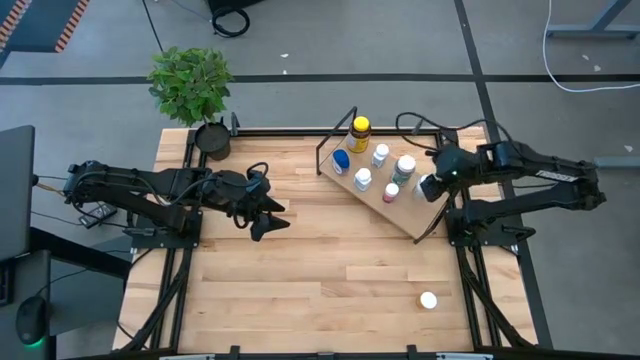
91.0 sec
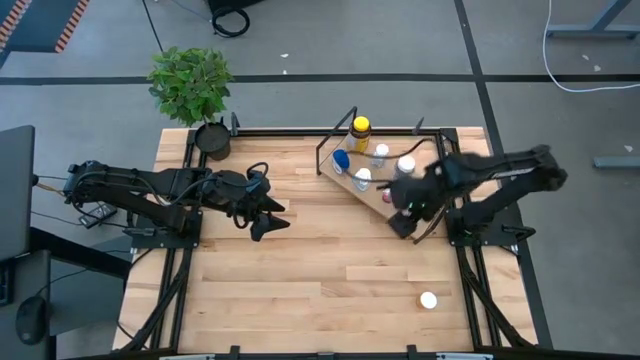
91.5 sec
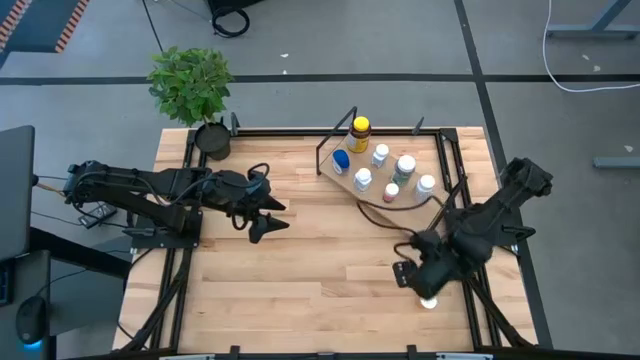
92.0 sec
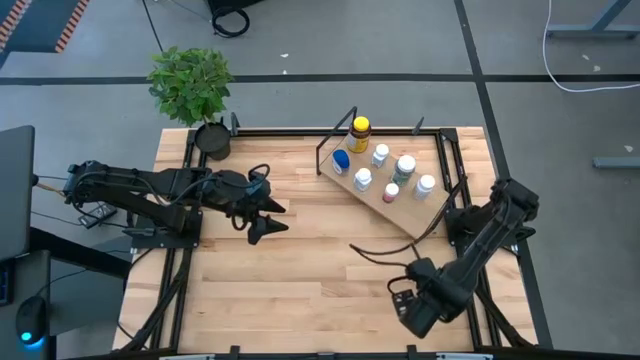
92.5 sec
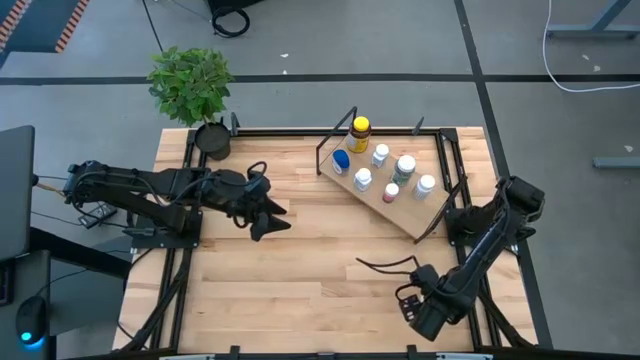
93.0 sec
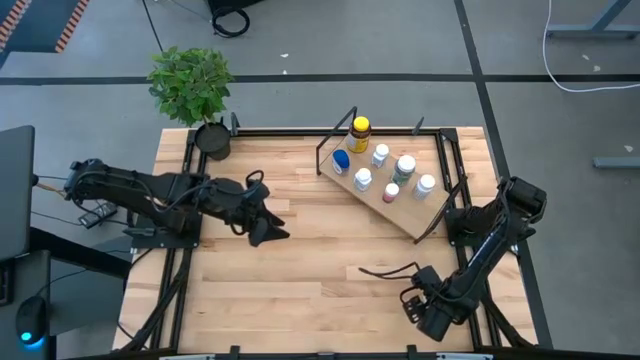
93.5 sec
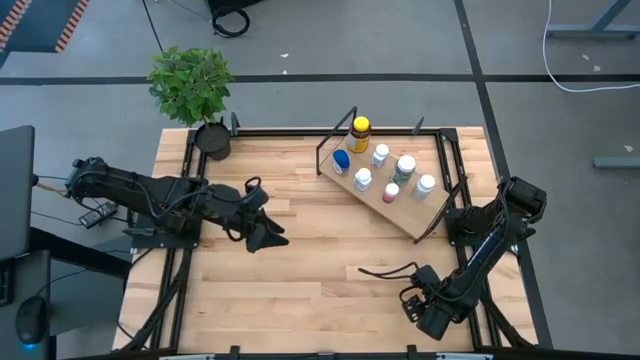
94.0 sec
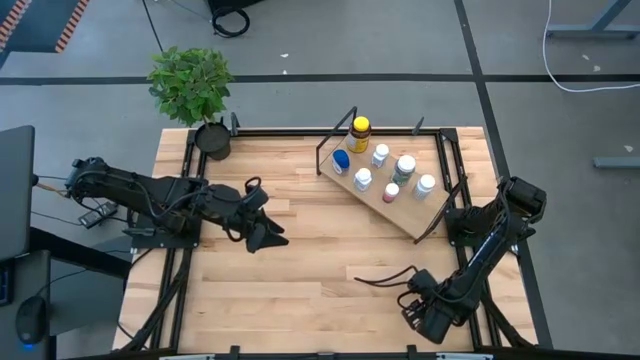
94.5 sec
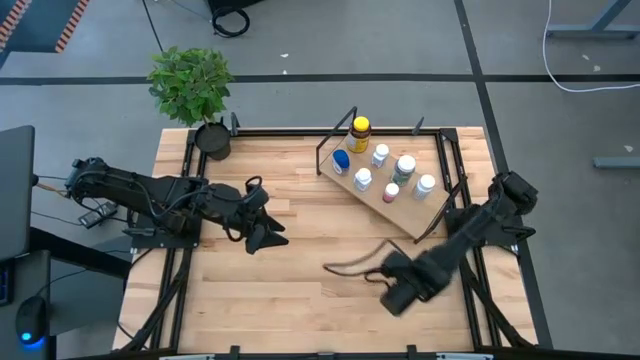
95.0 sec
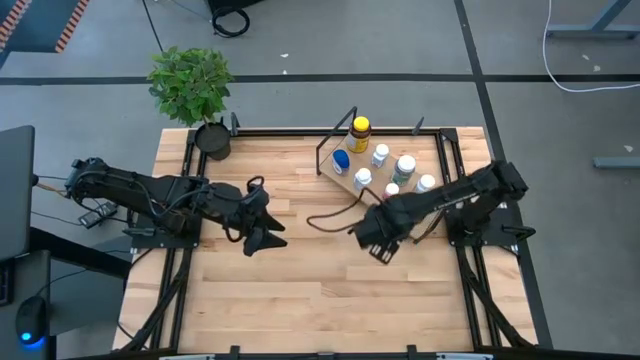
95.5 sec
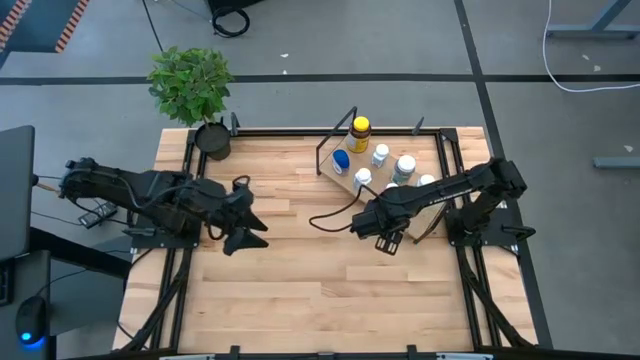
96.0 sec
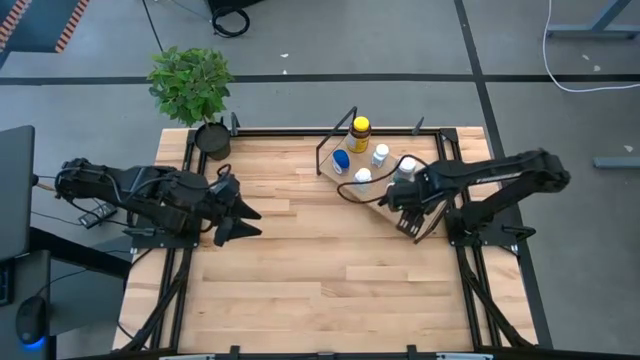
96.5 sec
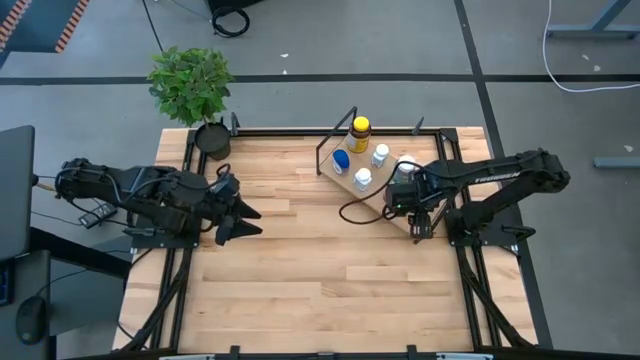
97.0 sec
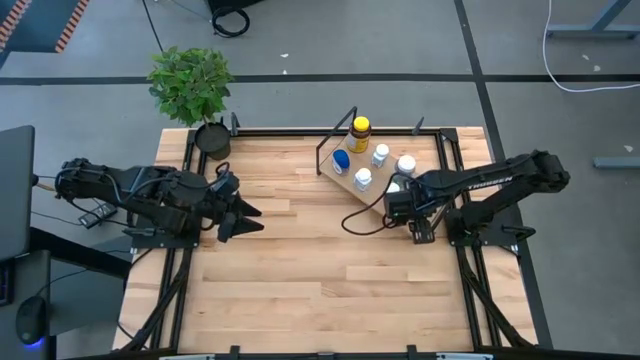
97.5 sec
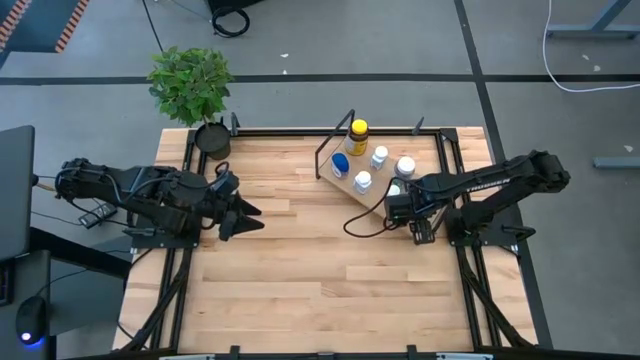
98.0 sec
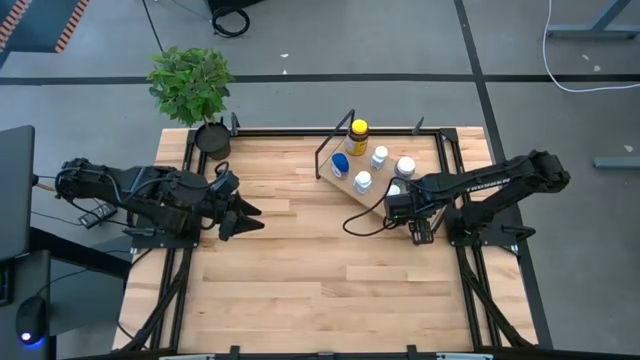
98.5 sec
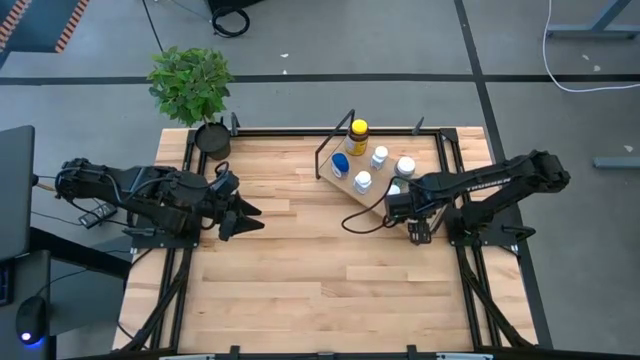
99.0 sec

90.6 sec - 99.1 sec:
Task: Pick and place medicine bottles onto shelf by color
Put the orange medicine bottle on the shelf

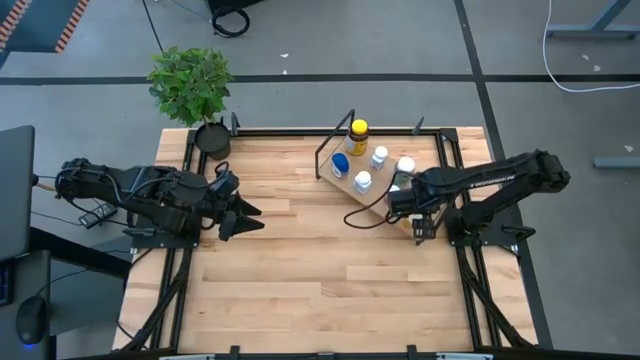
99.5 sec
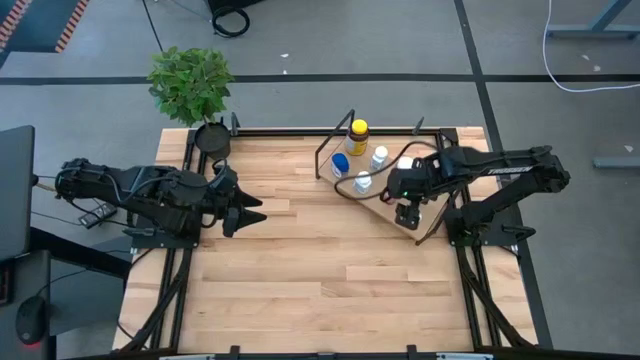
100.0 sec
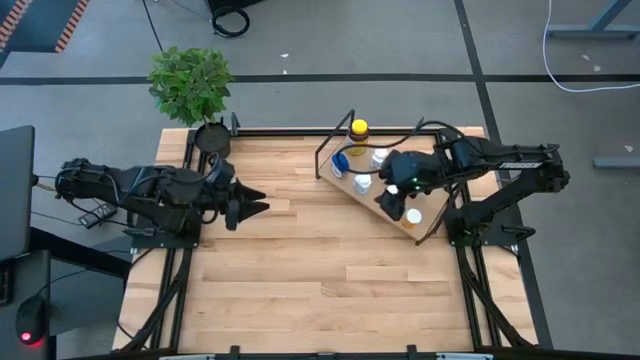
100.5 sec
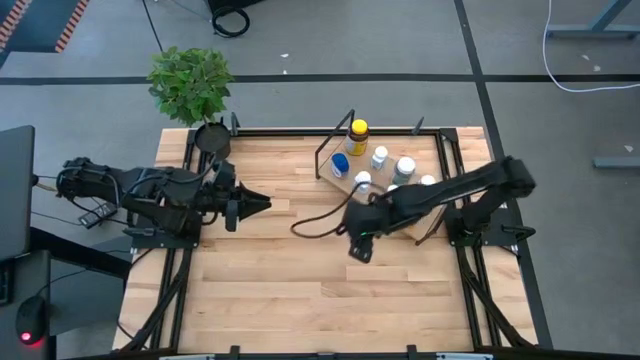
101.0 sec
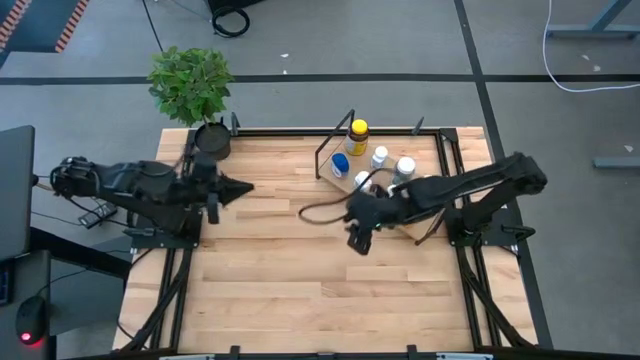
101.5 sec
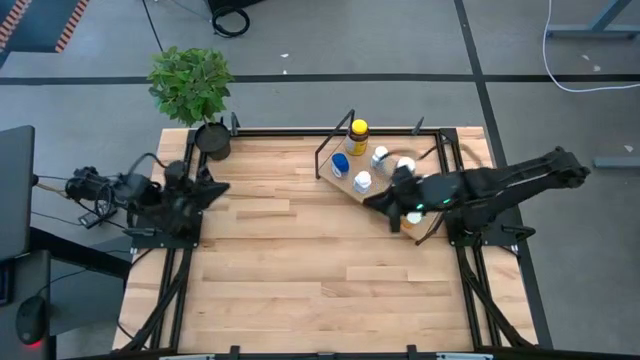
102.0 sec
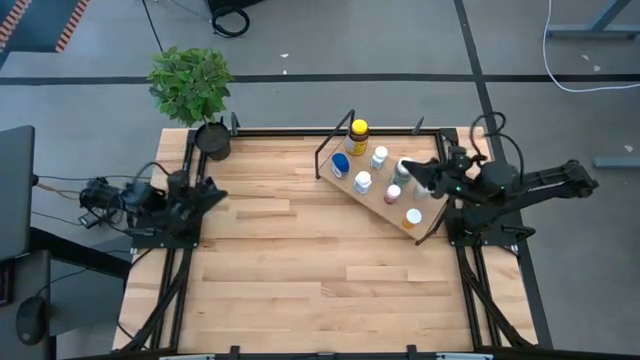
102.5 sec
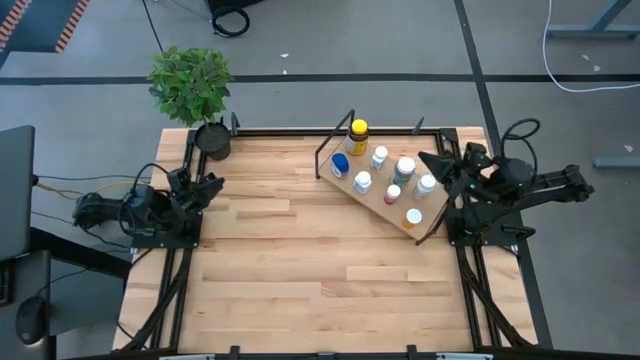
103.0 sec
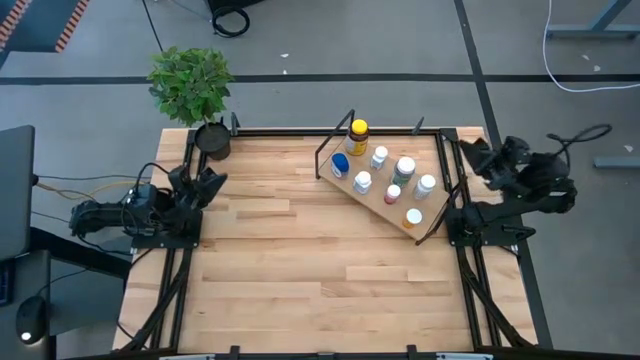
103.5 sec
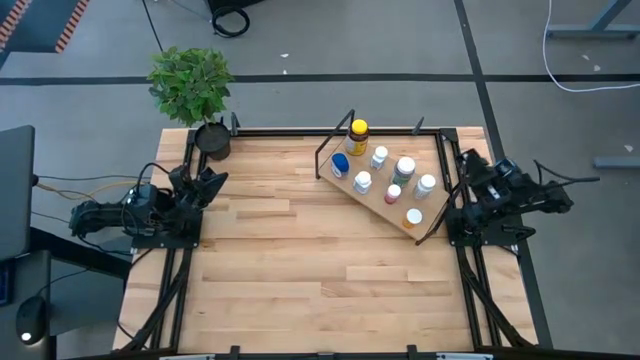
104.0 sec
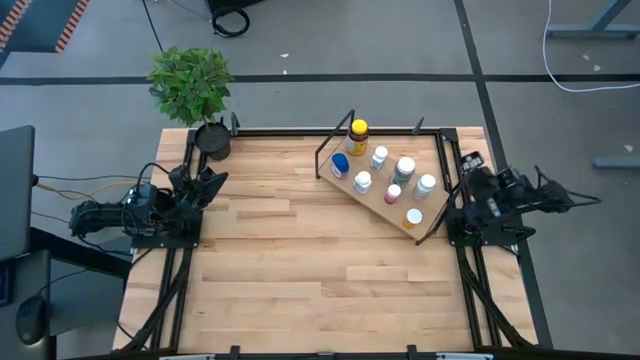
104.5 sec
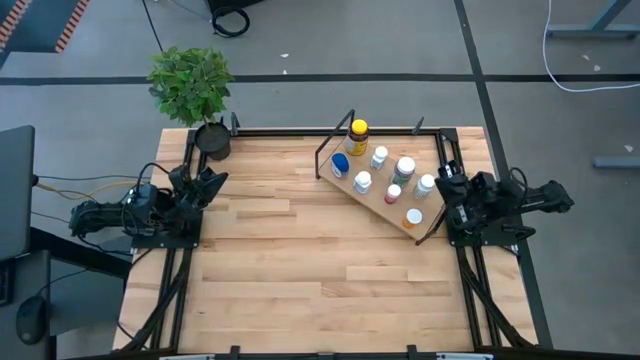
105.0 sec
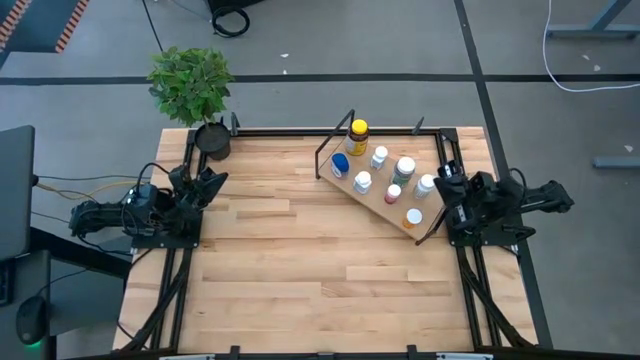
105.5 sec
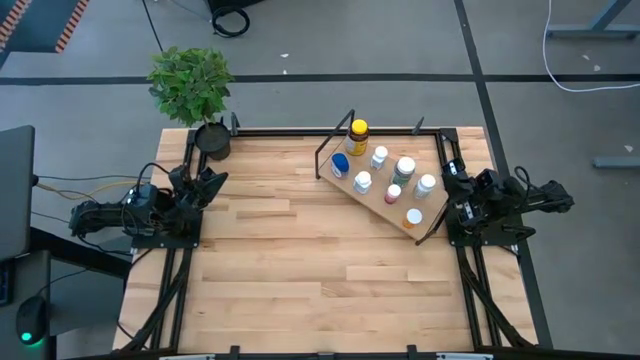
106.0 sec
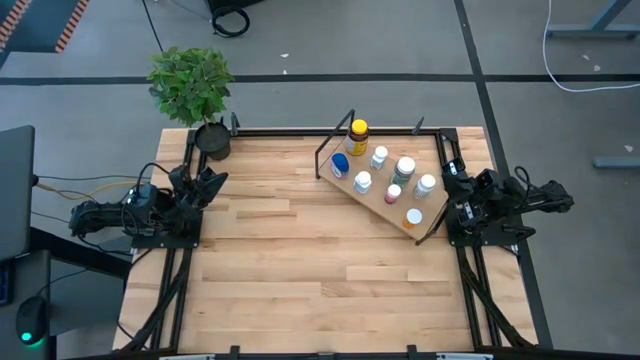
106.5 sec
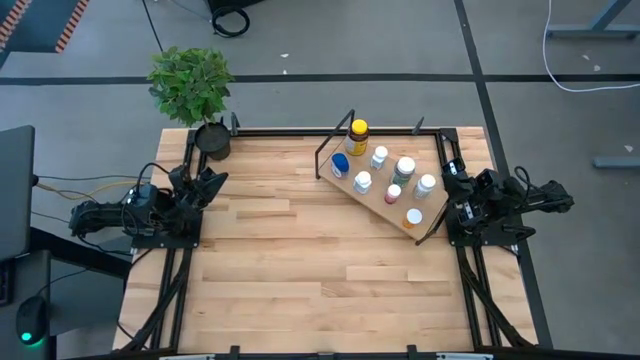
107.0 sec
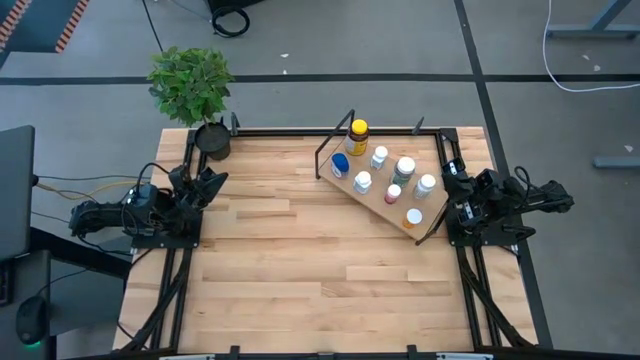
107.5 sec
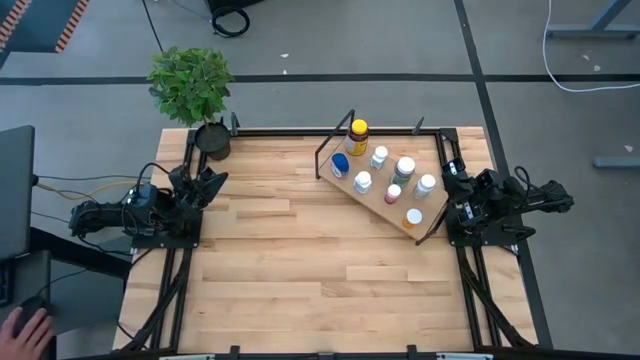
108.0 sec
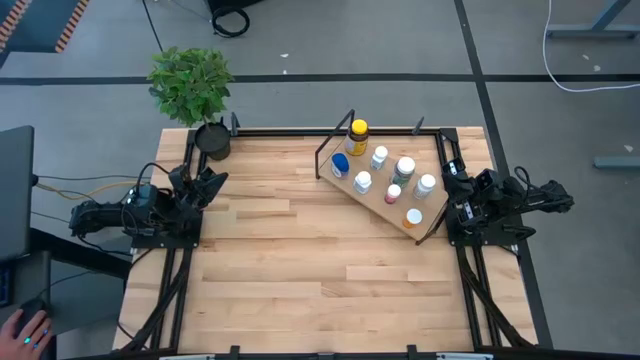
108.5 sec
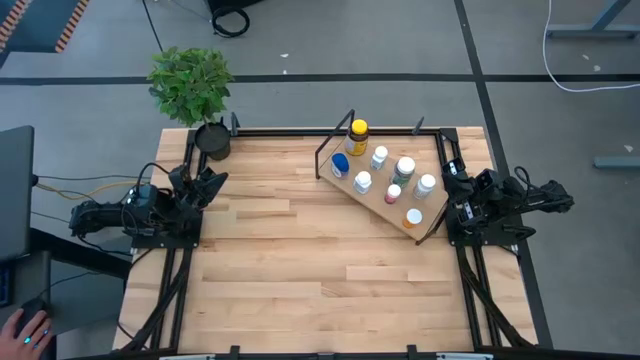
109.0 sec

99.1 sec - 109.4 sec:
Return to Home Position

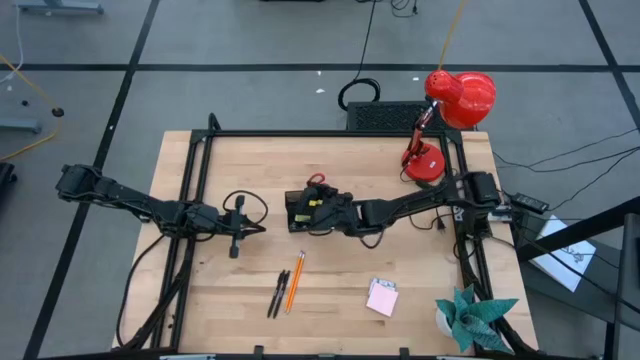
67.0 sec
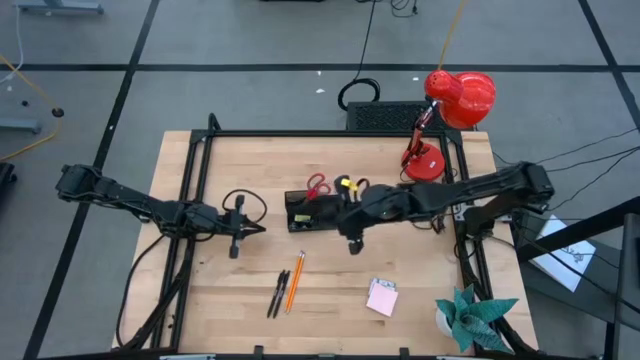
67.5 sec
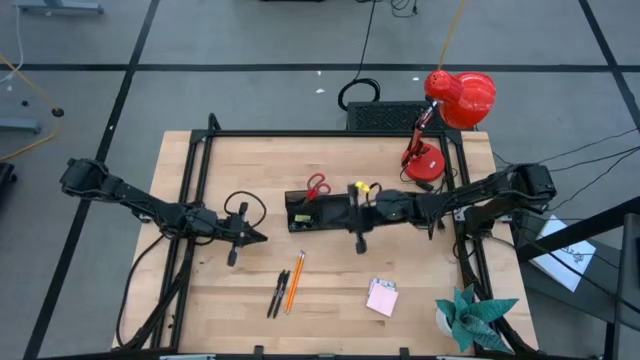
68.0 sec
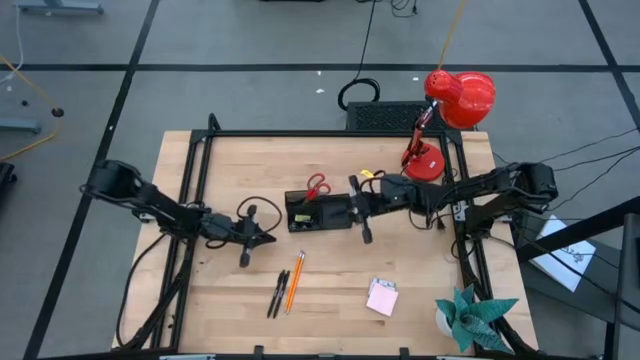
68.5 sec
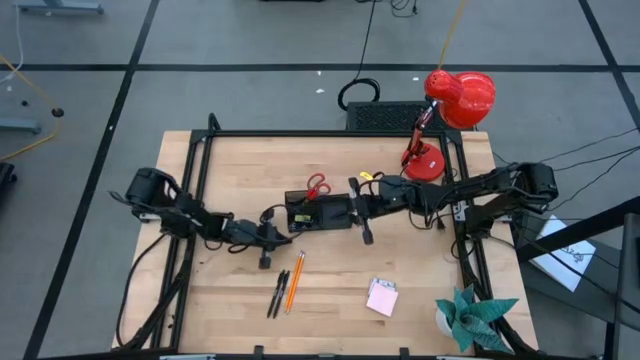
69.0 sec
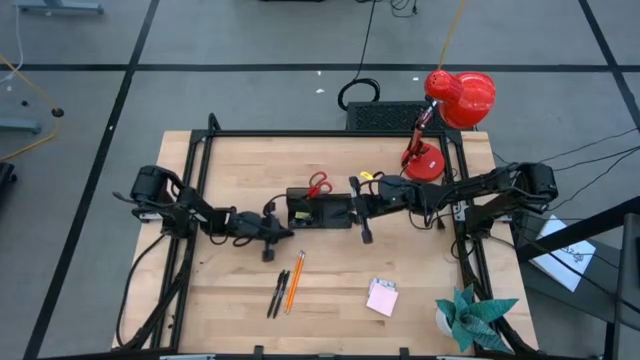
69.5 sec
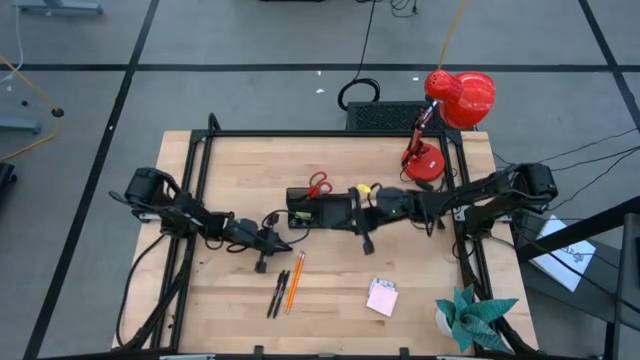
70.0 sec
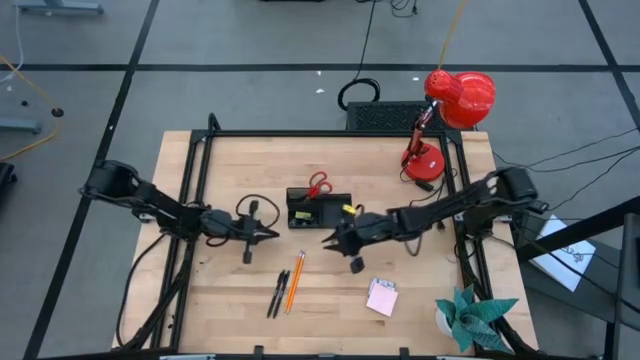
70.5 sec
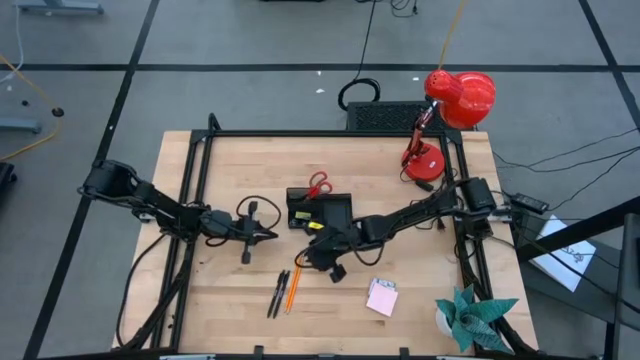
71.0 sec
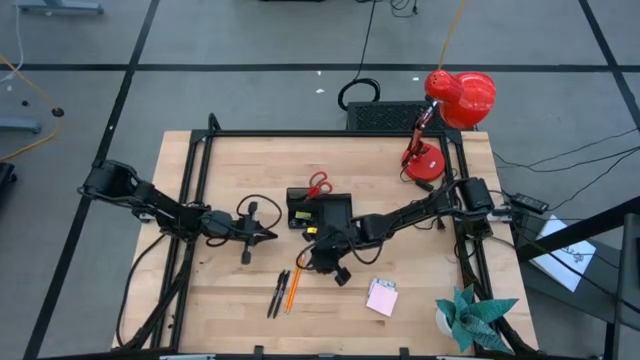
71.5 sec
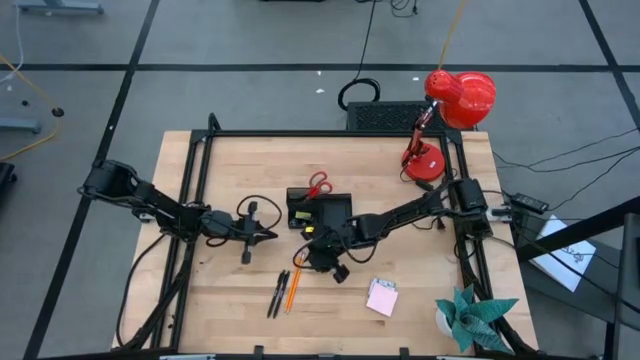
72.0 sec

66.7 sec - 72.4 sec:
Task: Pick and place office supplies into organizer
Put the orange pencil into the desk organizer
